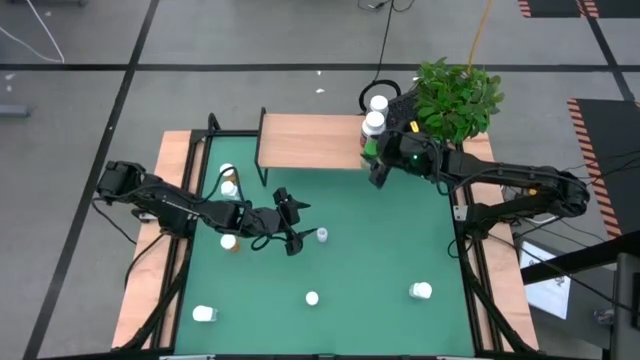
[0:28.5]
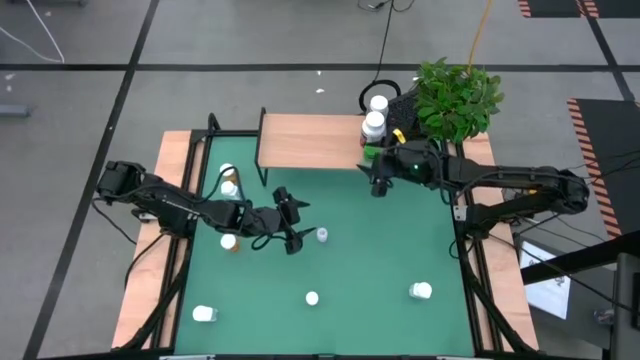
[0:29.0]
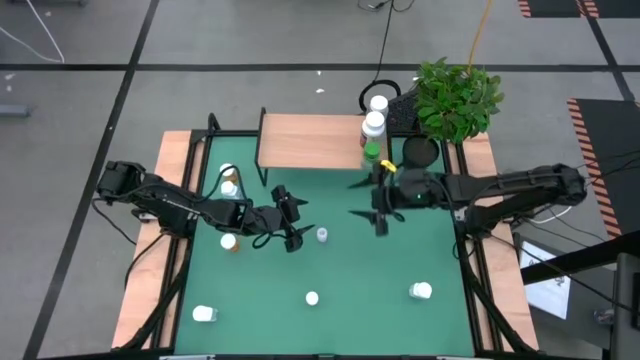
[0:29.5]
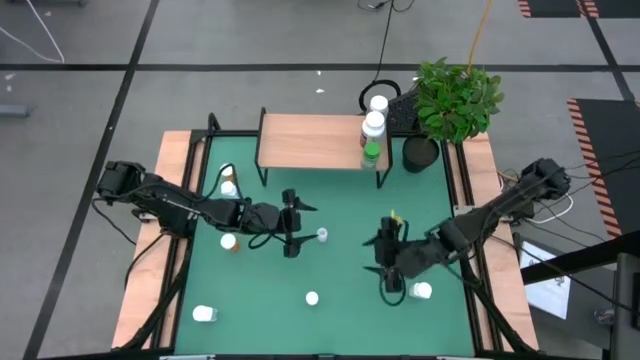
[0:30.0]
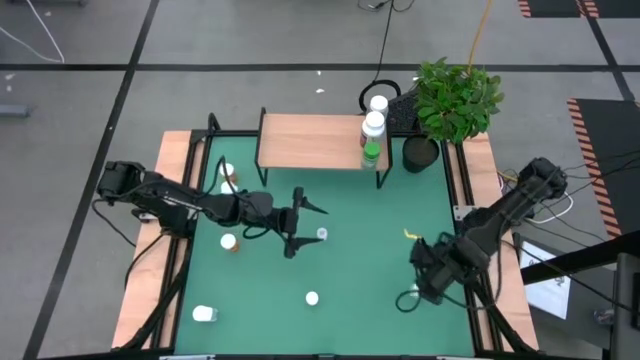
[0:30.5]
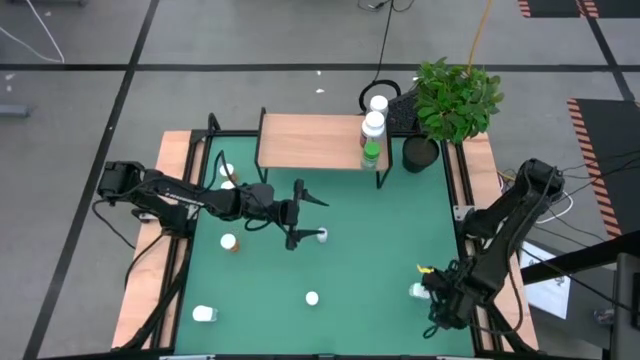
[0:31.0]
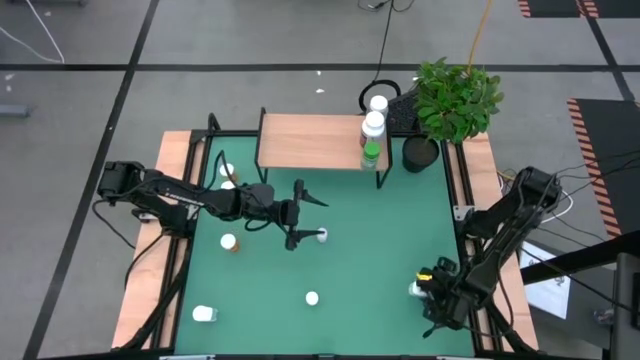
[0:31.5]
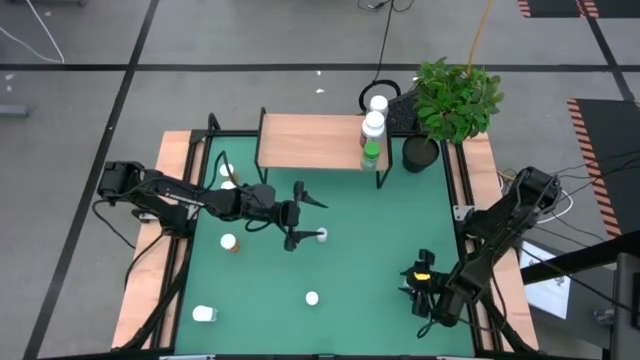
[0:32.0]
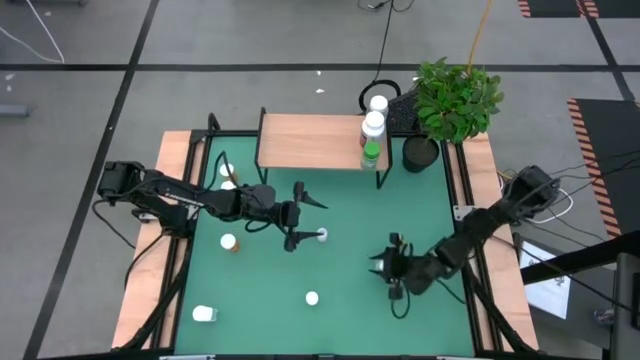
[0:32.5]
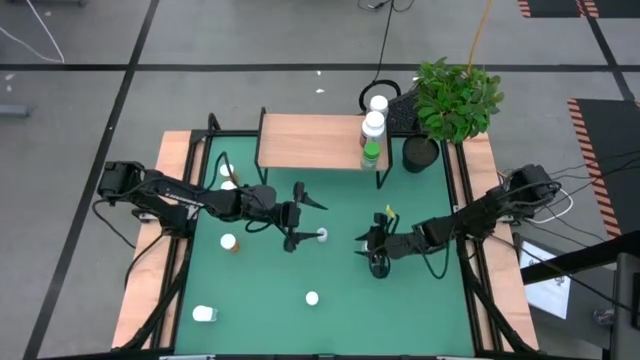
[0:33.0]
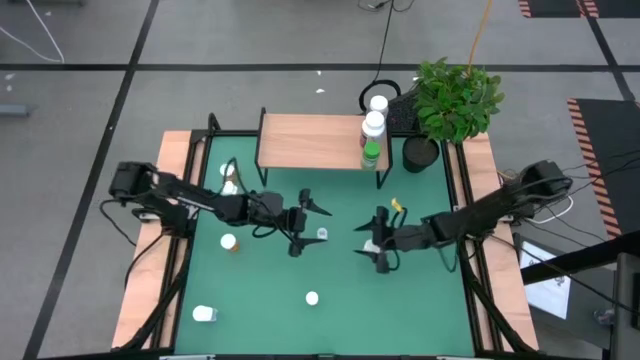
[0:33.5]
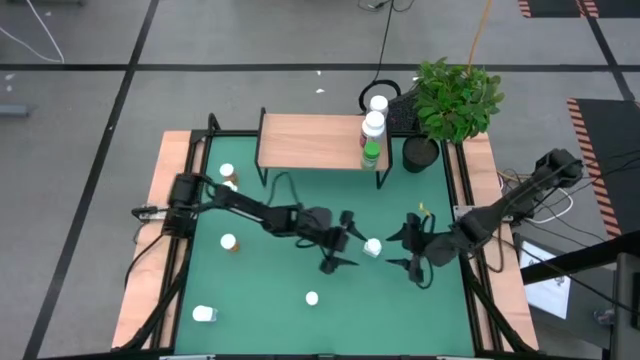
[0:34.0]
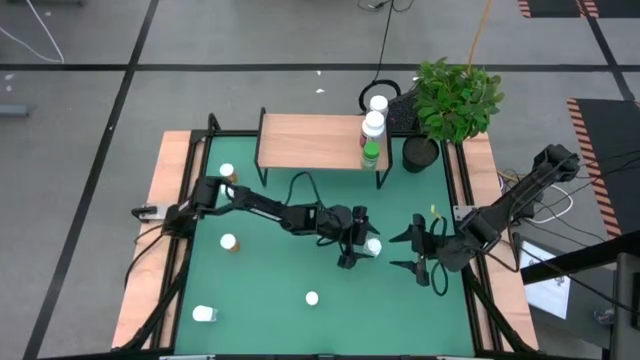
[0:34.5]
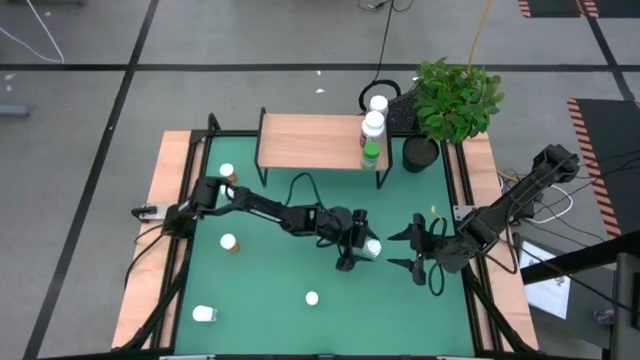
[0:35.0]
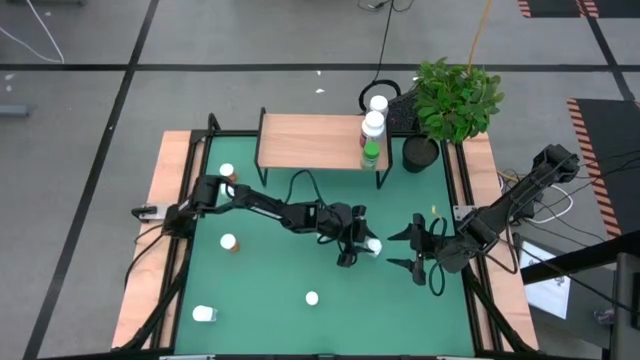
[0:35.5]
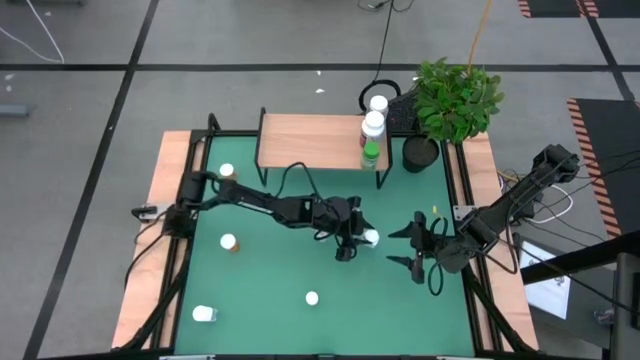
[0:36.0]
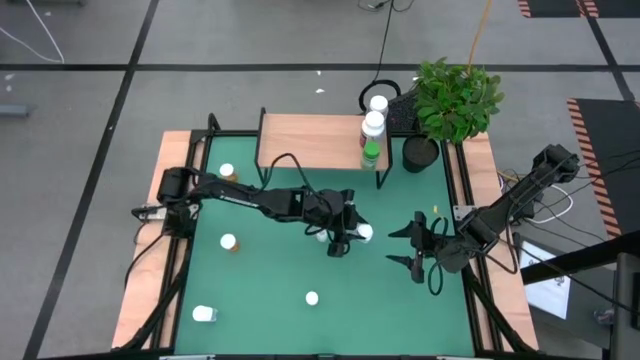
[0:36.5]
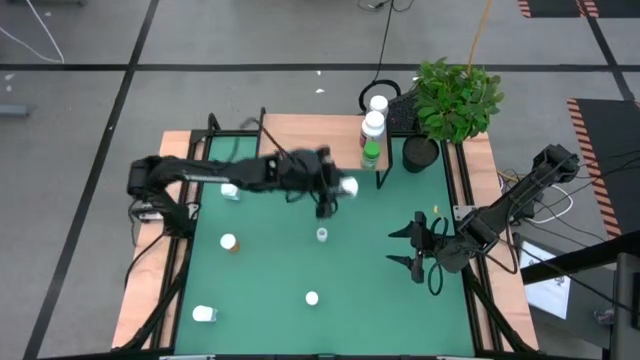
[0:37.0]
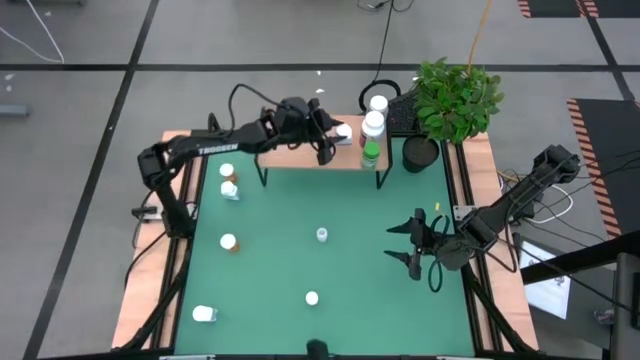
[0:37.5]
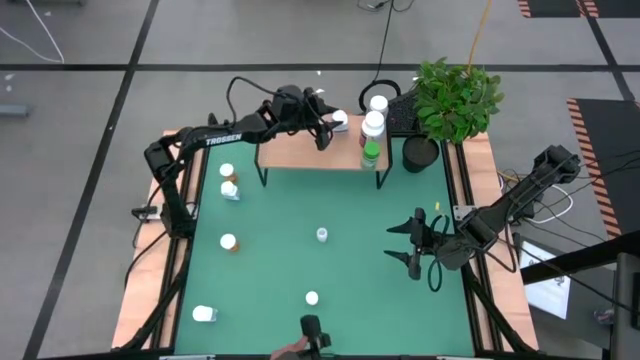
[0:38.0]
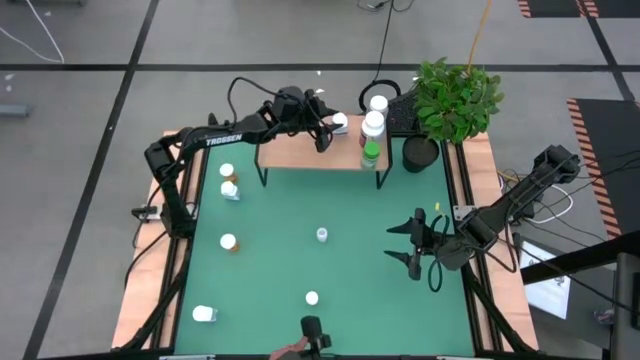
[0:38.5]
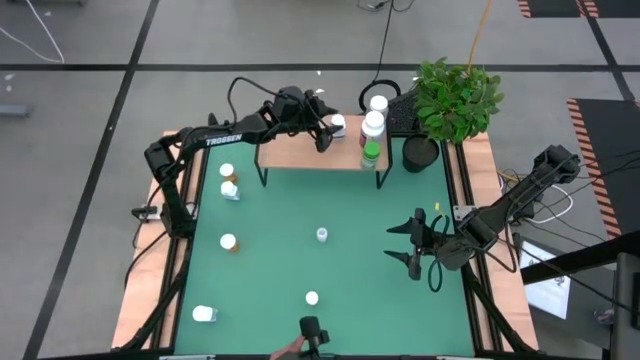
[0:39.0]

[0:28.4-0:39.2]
Task: Pick and place medicine bottles onto shelf by color
Put the big blue pill bottle on the bottom right of the shelf

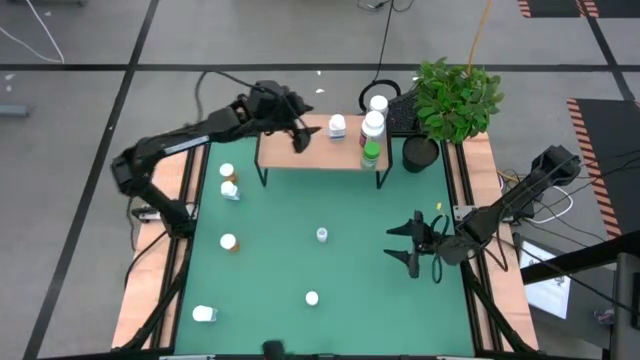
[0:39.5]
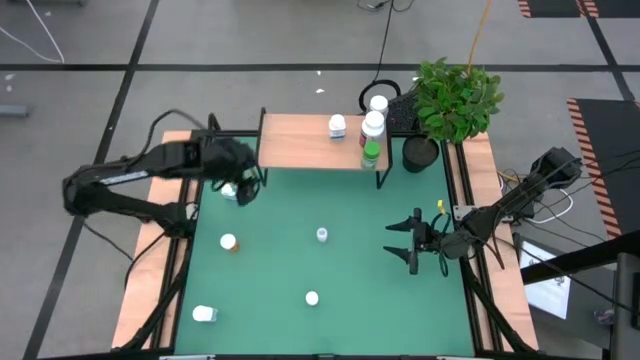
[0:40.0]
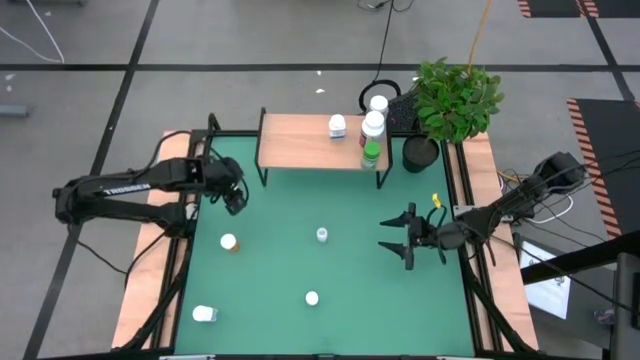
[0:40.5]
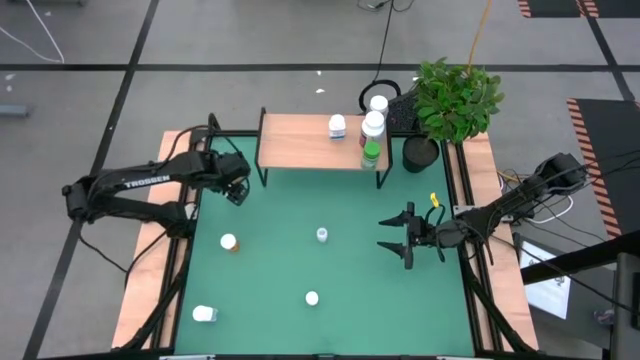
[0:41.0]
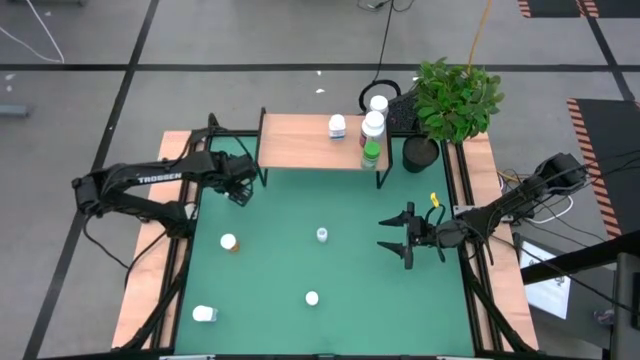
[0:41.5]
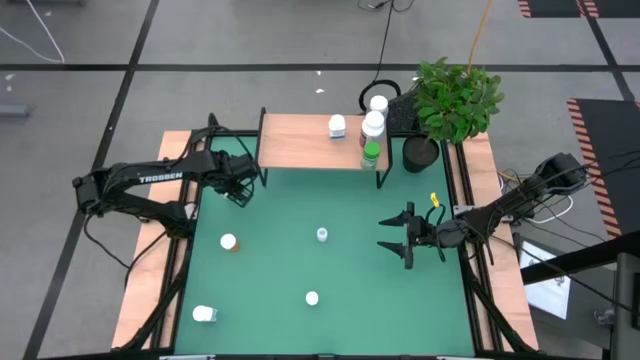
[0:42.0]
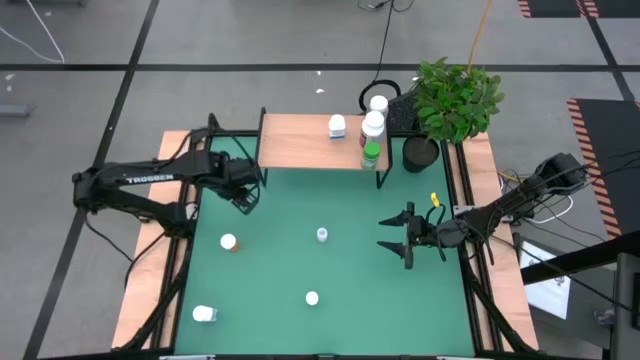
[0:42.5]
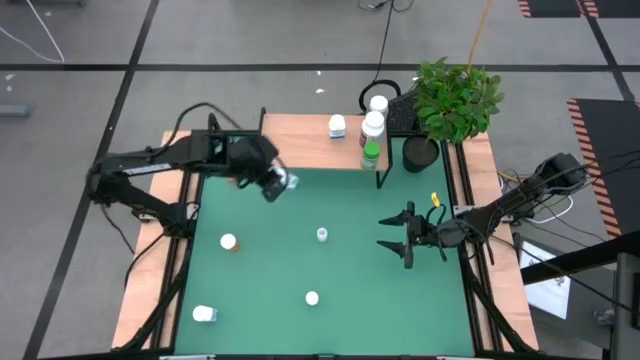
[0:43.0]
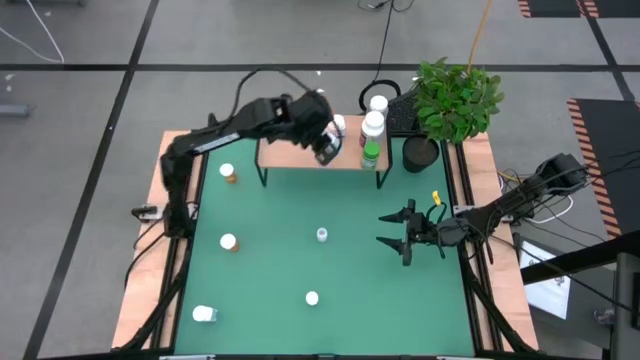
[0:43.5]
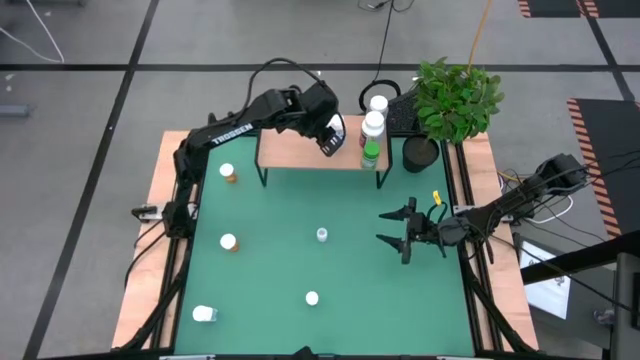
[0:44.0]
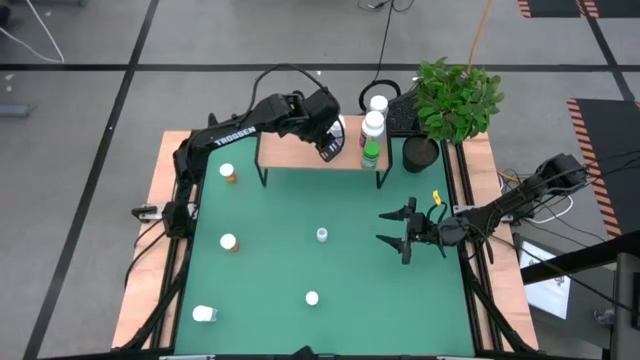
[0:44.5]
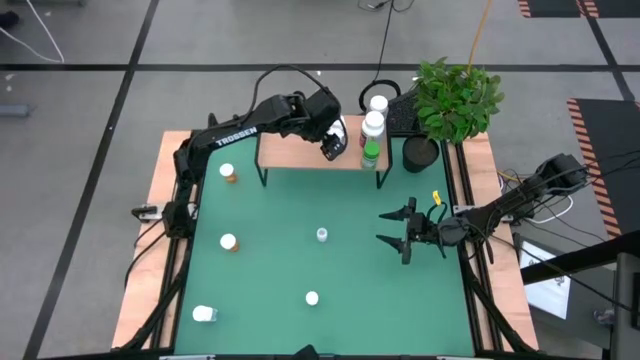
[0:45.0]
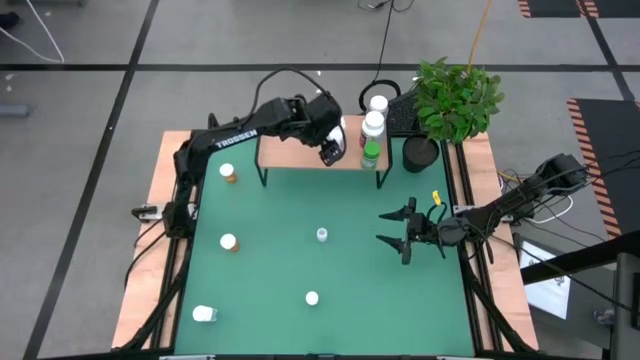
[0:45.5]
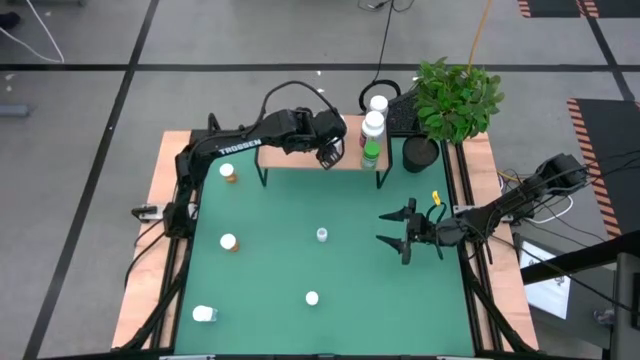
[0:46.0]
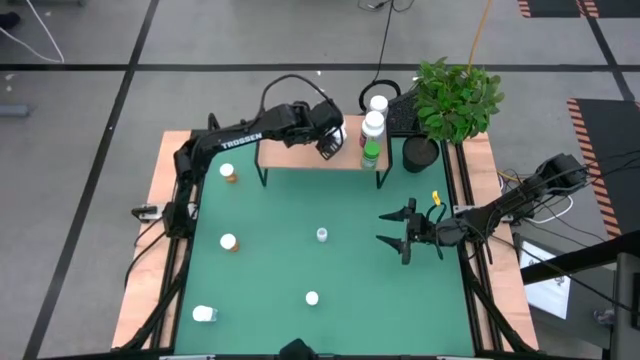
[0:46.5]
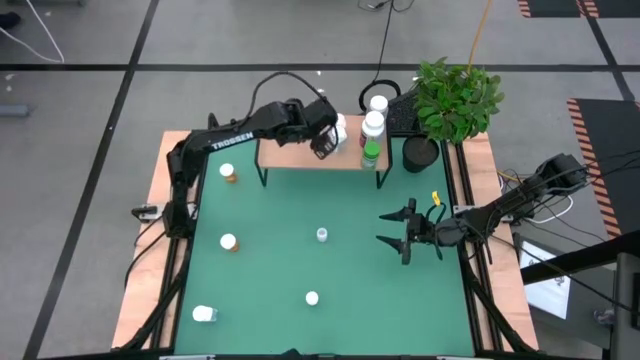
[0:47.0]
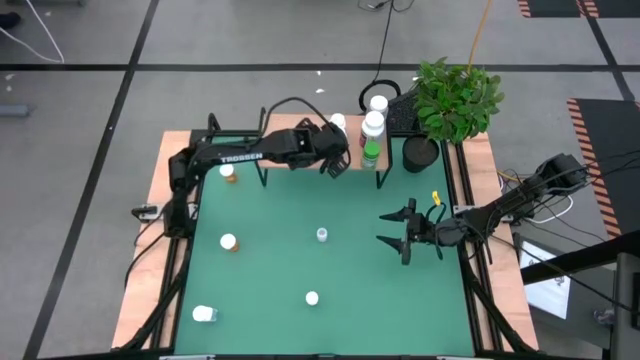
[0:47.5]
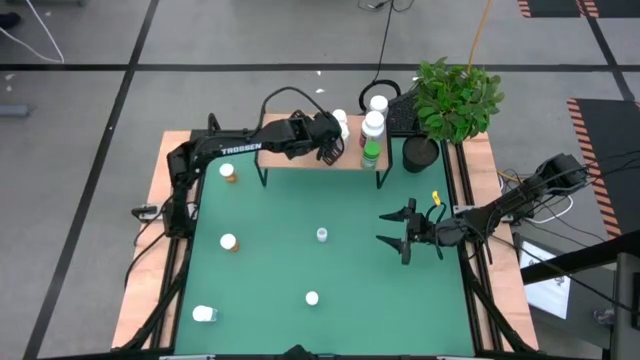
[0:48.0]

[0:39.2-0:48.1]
Align the top big blue pill bottle with the other big blue pill bottle on the shelf
